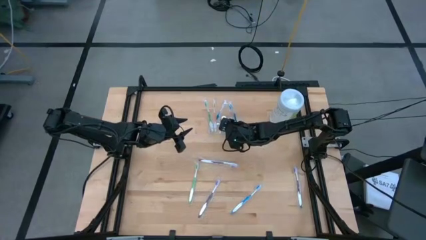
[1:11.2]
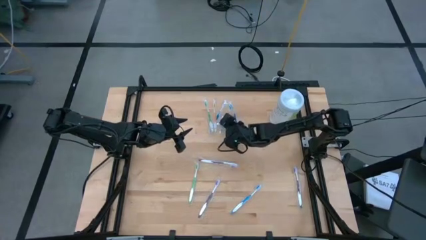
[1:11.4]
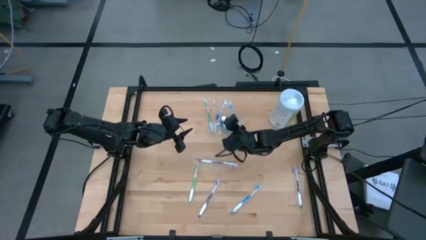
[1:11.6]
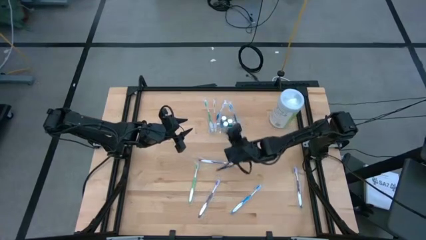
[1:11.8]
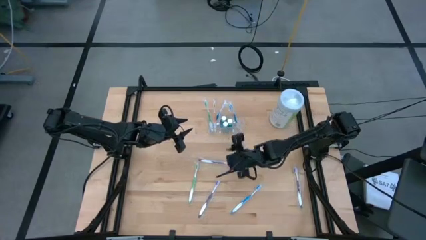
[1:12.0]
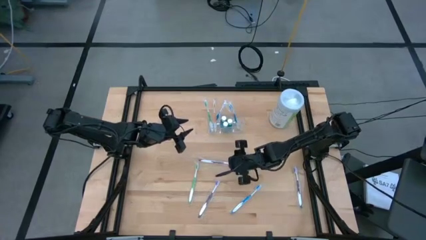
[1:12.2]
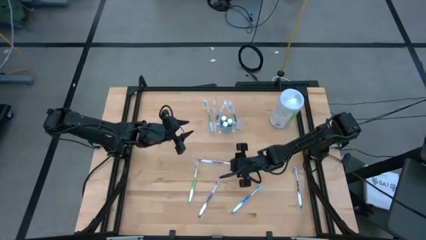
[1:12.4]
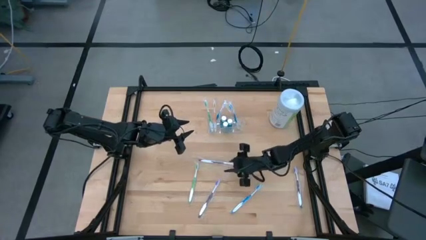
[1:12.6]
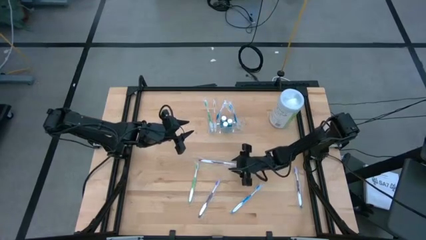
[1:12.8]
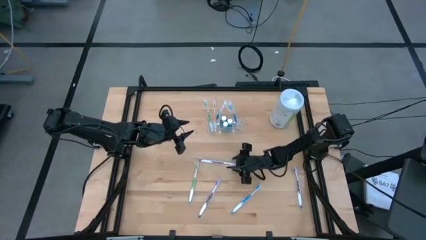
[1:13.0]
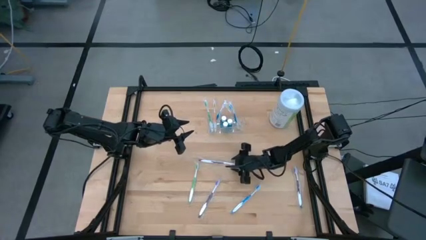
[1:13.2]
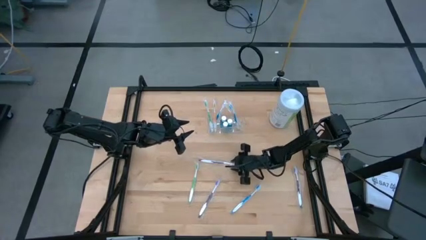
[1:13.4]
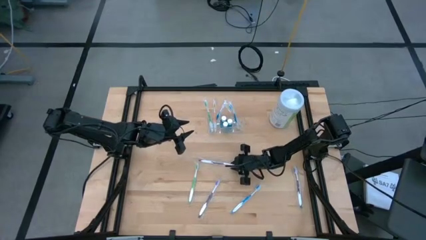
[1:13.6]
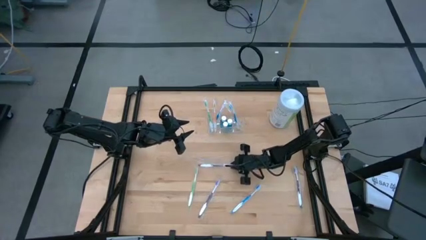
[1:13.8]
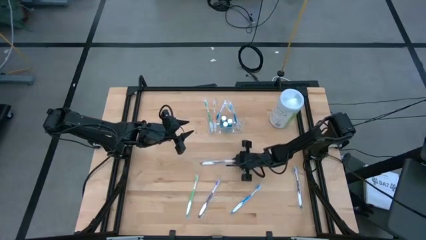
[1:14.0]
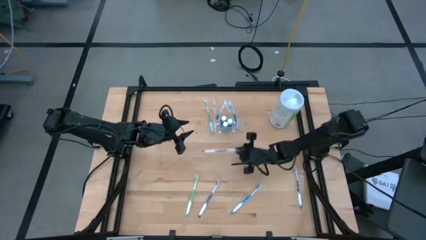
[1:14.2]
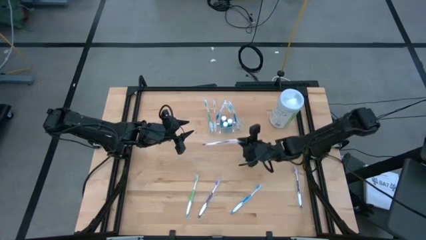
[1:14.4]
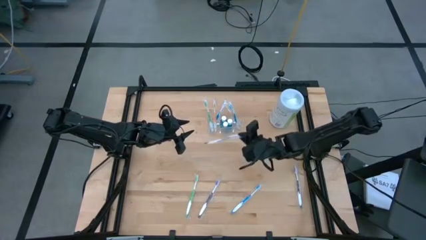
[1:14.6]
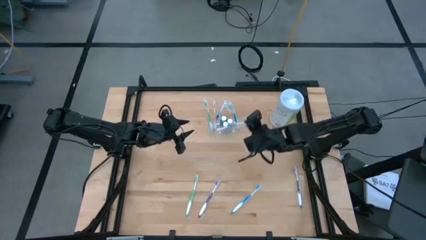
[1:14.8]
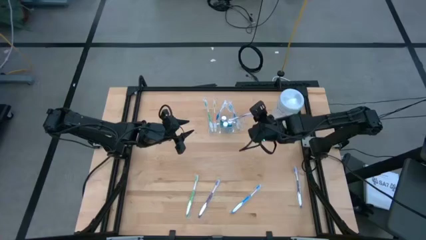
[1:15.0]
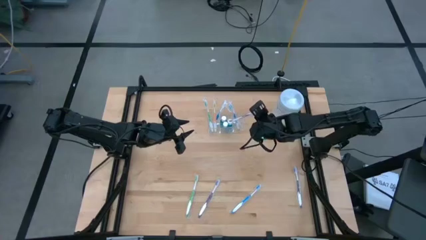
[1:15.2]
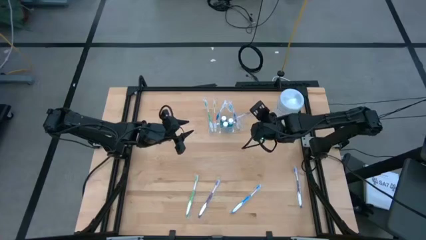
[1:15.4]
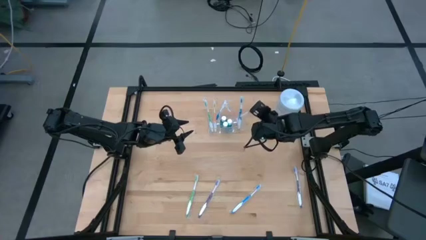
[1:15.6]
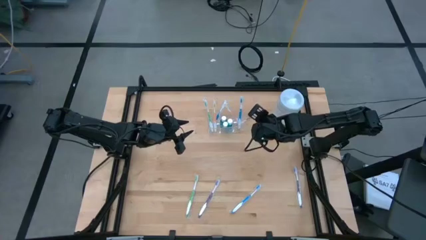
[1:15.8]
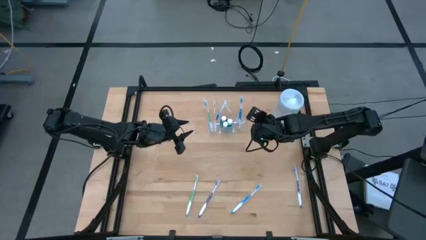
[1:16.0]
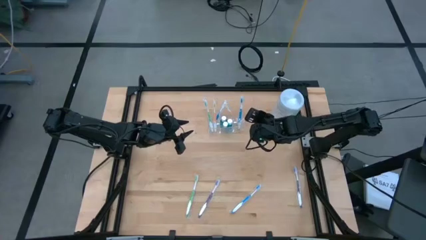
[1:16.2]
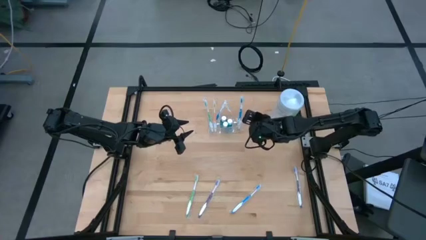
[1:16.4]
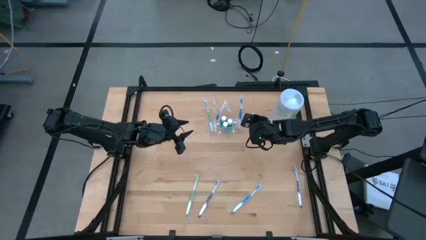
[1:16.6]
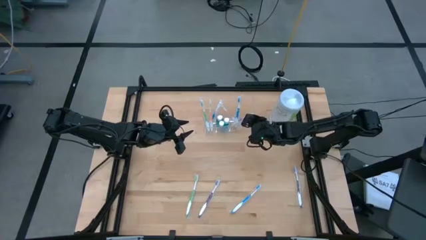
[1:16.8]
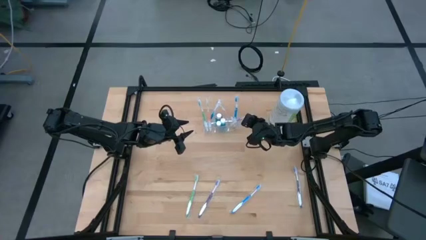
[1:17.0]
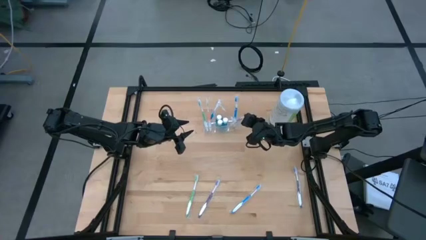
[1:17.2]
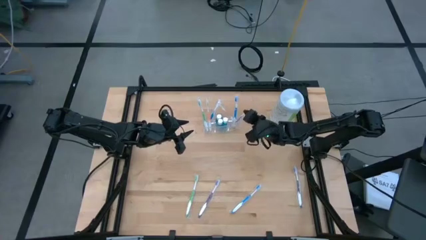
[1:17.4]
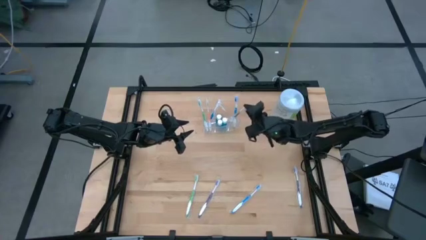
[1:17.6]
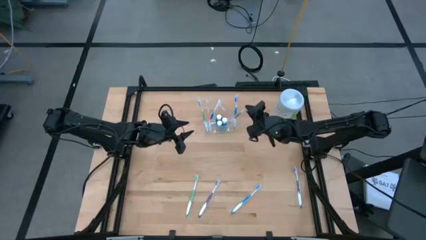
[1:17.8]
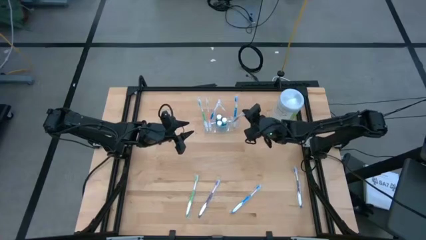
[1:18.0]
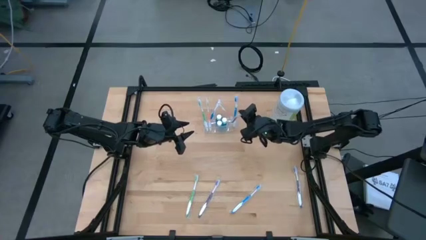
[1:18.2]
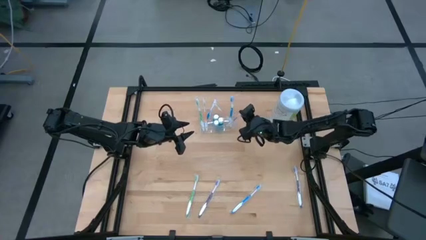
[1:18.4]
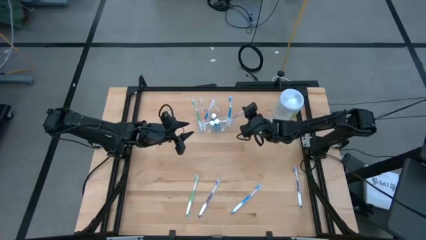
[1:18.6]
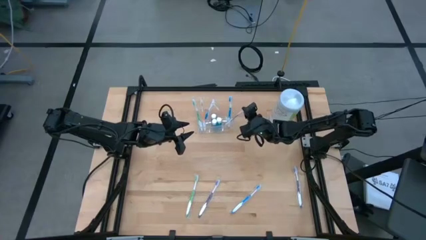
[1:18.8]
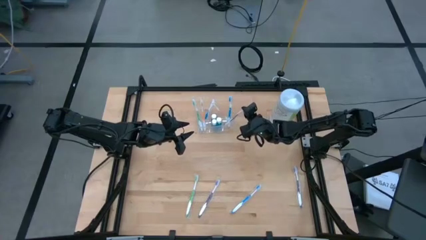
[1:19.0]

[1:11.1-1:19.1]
Task: Pick & Place toothbrushing station
Put the top violet toothbrush into the transparent organizer

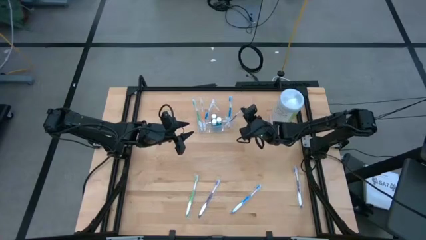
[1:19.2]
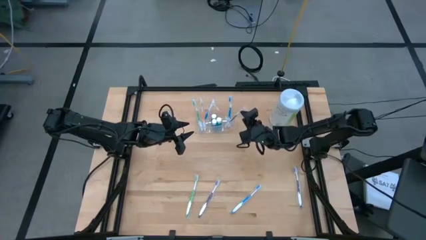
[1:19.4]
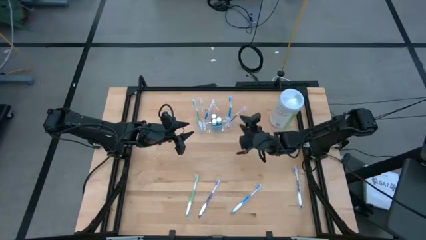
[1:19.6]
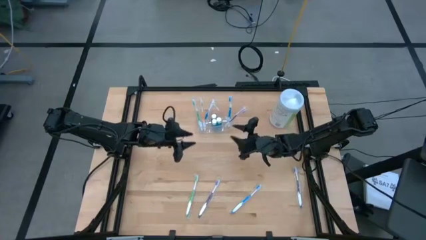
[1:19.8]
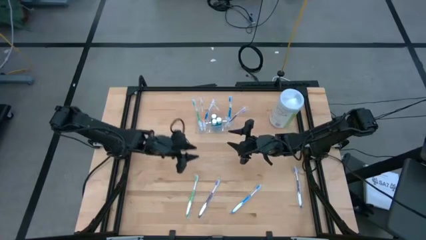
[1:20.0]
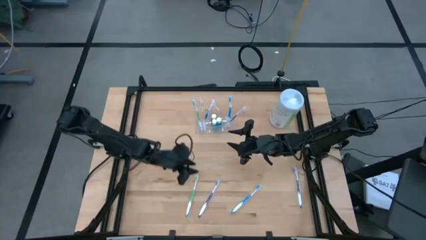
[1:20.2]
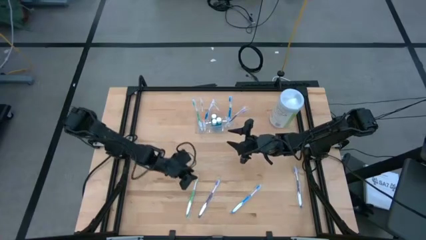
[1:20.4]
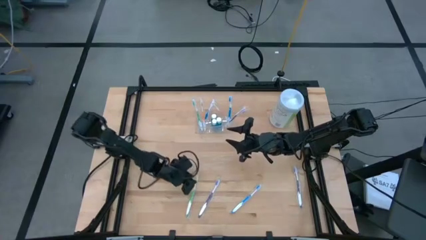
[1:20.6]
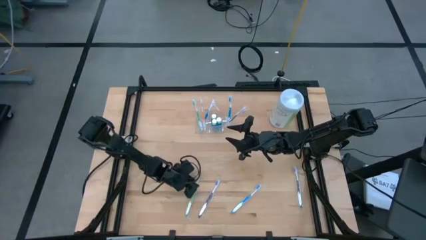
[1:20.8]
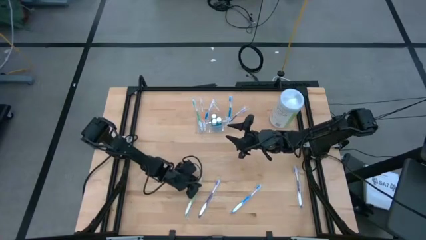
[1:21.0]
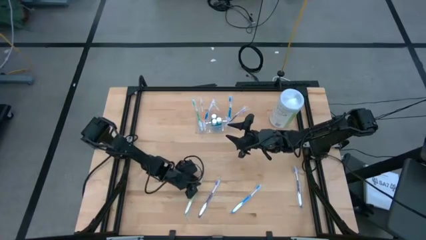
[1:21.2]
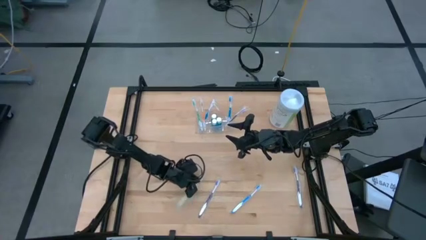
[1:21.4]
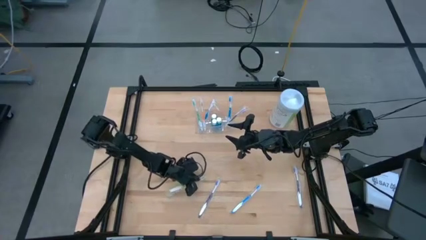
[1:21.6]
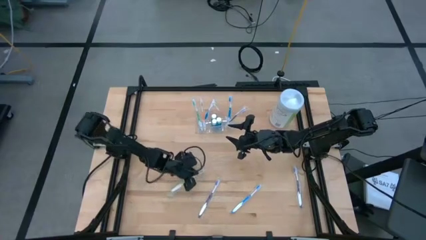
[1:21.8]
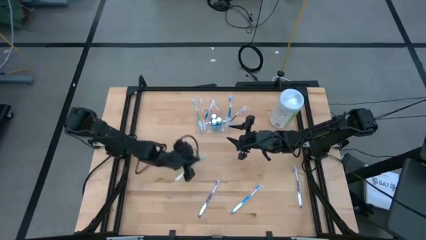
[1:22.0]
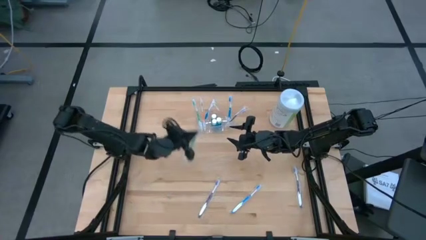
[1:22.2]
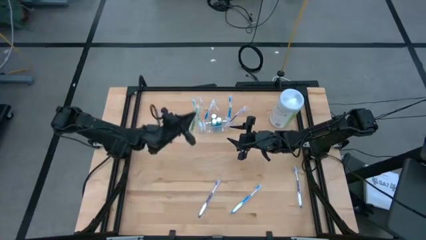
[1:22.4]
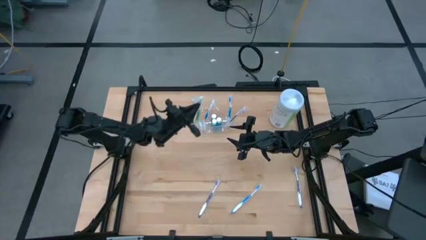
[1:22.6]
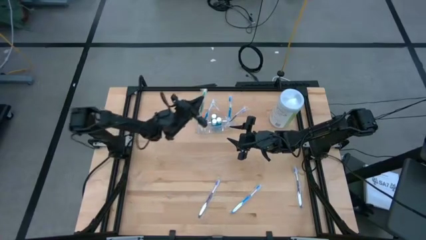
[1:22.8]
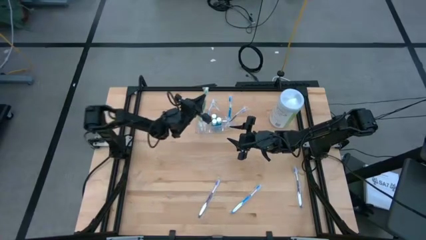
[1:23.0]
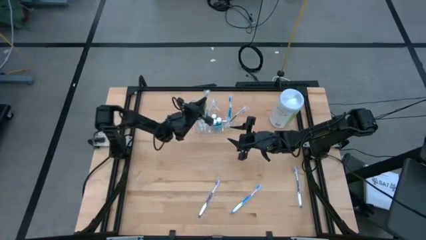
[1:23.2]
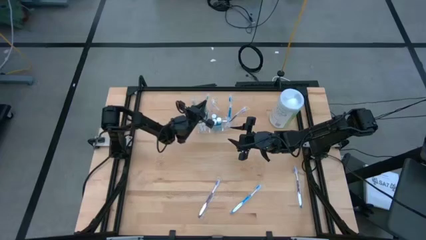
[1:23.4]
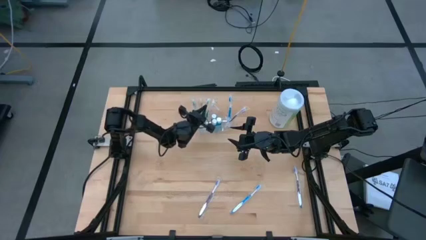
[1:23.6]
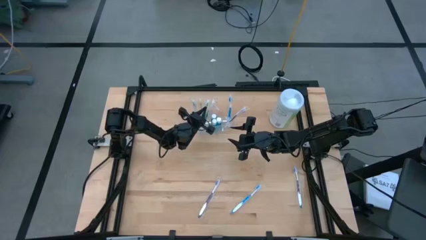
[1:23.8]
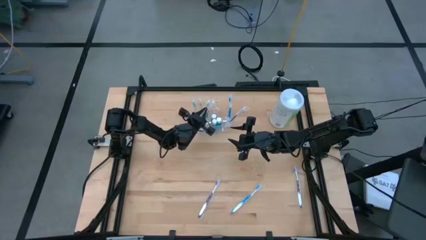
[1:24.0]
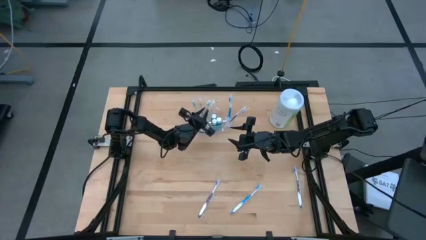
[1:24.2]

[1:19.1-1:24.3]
Put the green toothbrush into the transparent organizer
